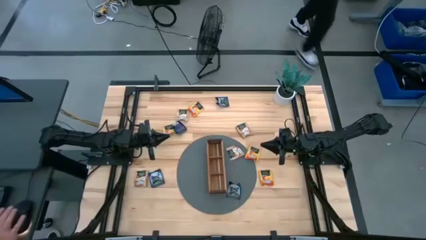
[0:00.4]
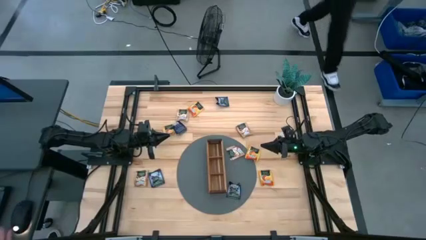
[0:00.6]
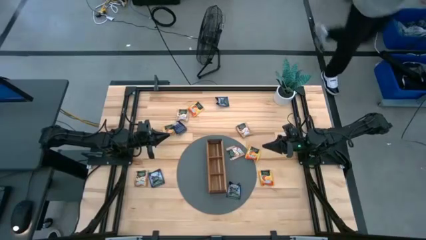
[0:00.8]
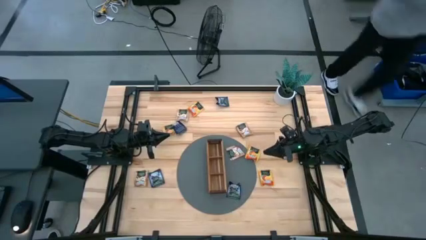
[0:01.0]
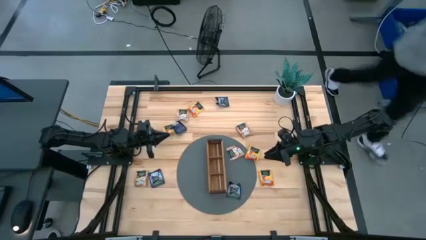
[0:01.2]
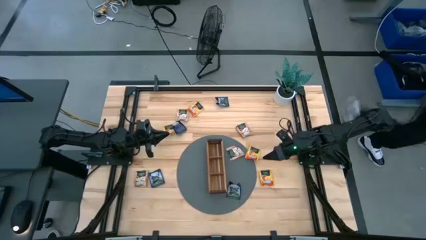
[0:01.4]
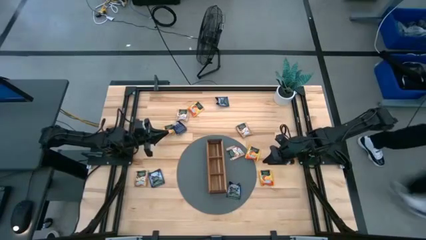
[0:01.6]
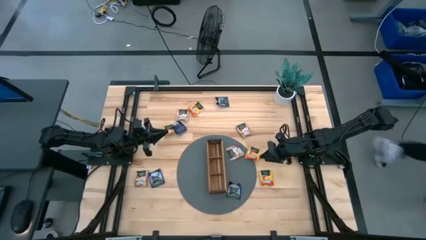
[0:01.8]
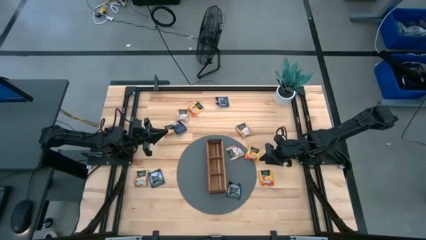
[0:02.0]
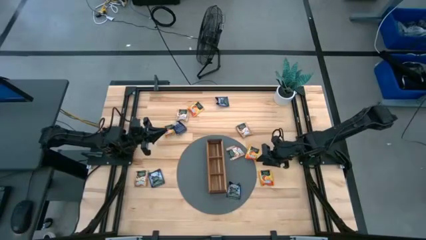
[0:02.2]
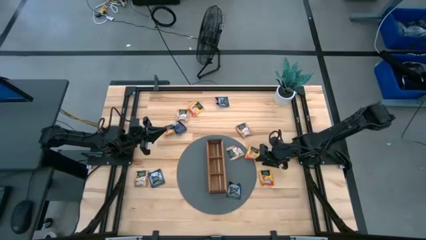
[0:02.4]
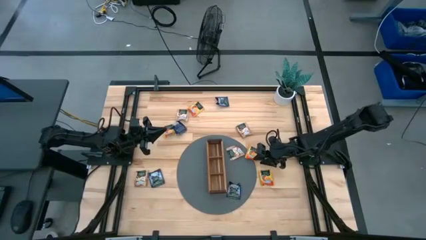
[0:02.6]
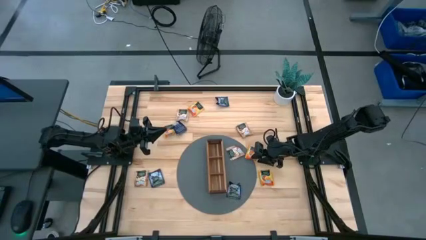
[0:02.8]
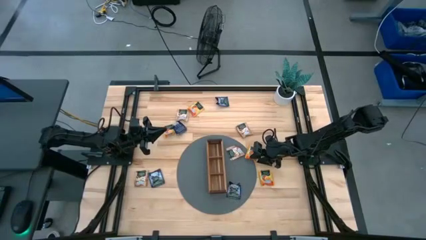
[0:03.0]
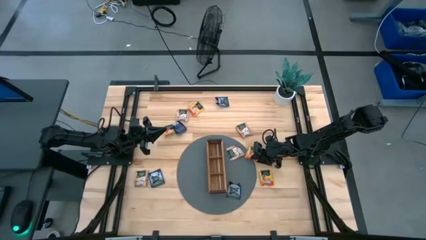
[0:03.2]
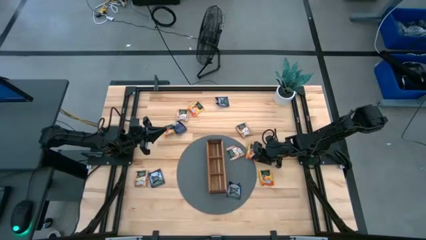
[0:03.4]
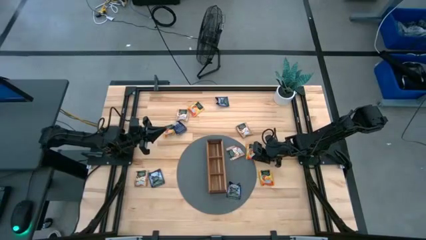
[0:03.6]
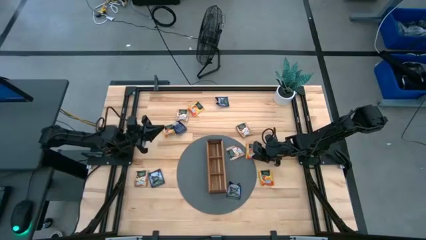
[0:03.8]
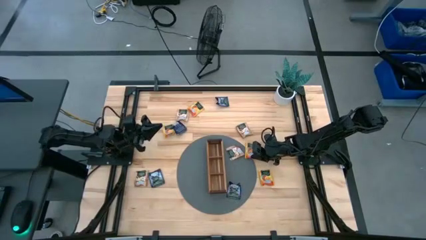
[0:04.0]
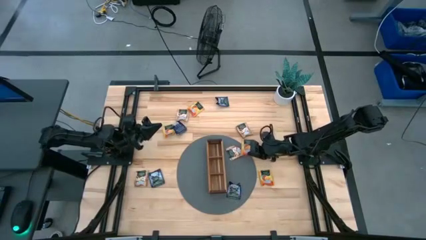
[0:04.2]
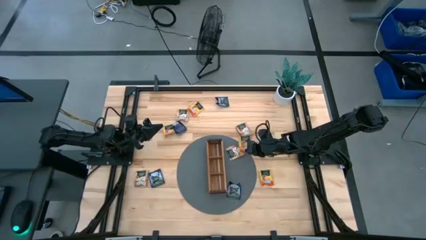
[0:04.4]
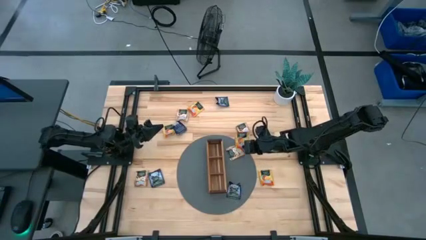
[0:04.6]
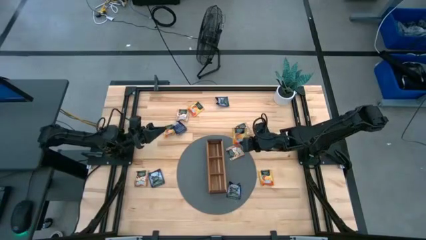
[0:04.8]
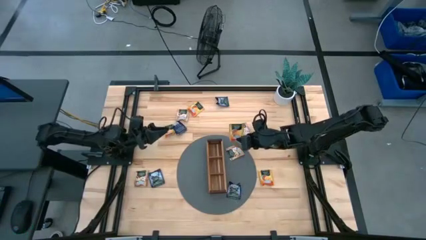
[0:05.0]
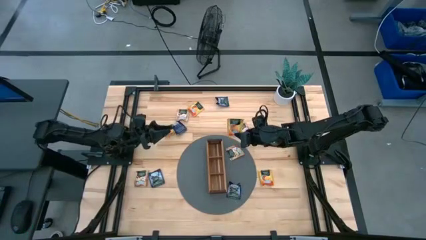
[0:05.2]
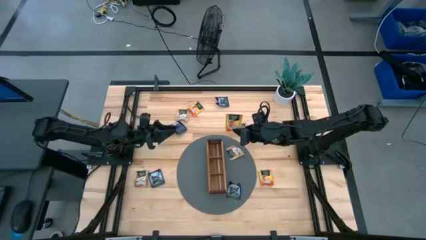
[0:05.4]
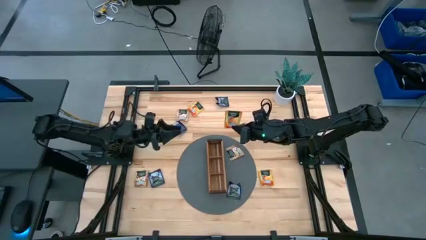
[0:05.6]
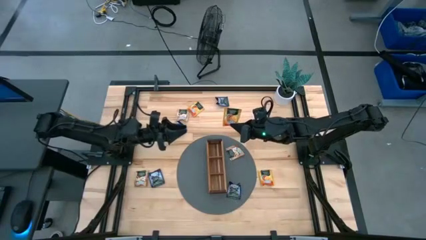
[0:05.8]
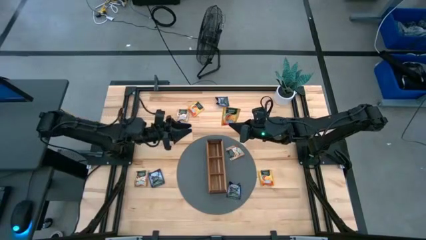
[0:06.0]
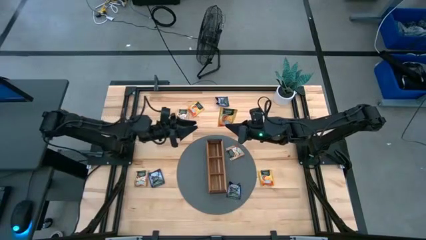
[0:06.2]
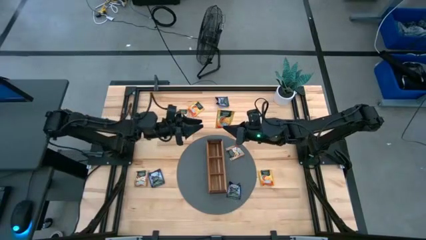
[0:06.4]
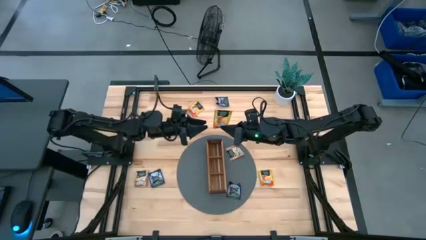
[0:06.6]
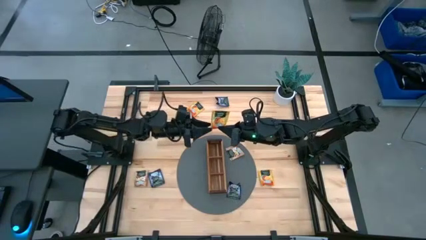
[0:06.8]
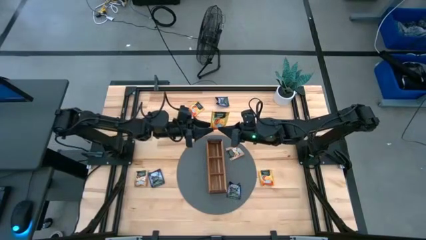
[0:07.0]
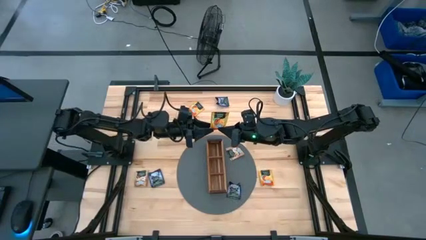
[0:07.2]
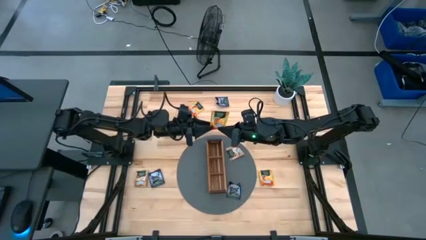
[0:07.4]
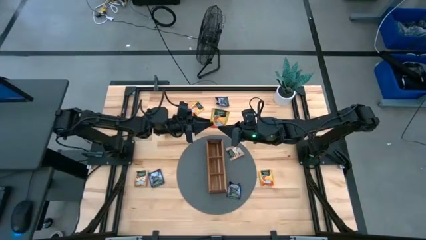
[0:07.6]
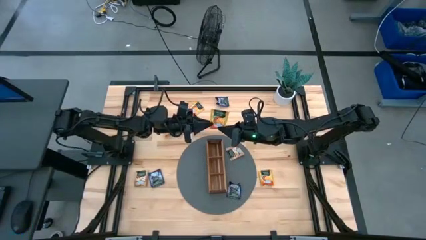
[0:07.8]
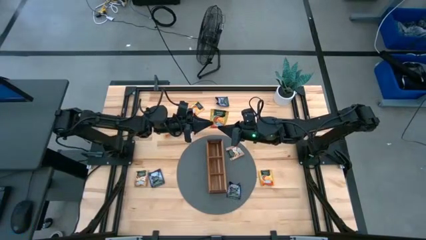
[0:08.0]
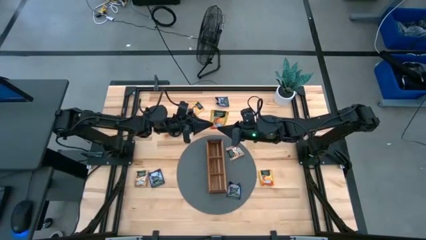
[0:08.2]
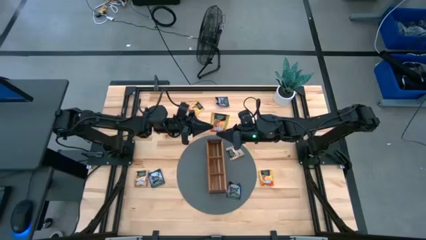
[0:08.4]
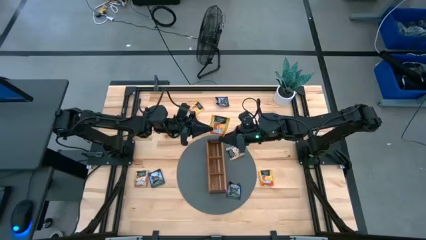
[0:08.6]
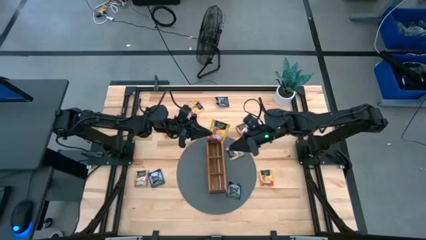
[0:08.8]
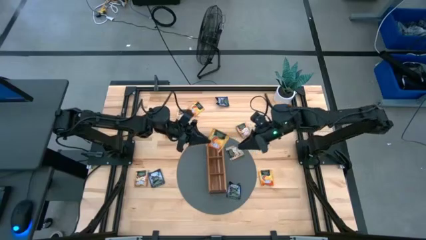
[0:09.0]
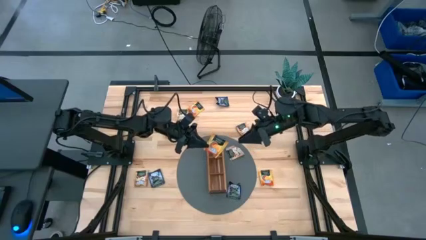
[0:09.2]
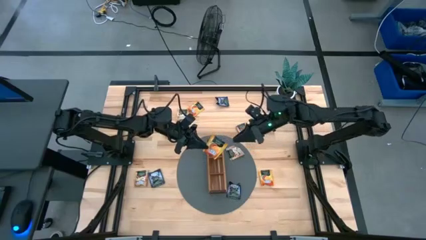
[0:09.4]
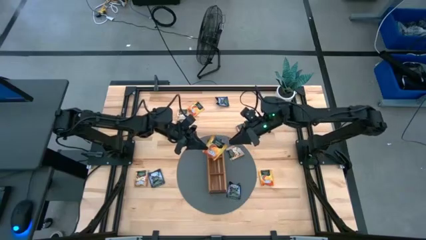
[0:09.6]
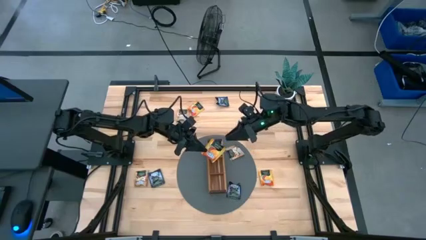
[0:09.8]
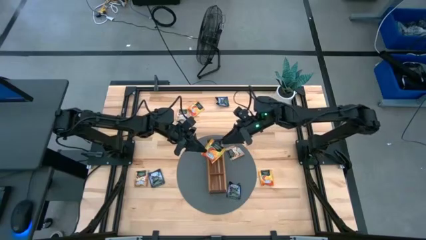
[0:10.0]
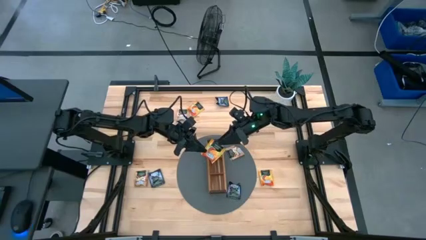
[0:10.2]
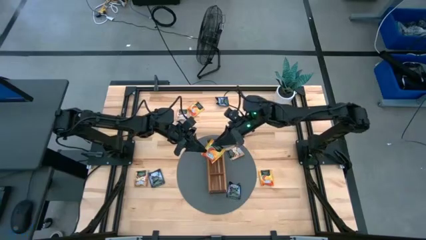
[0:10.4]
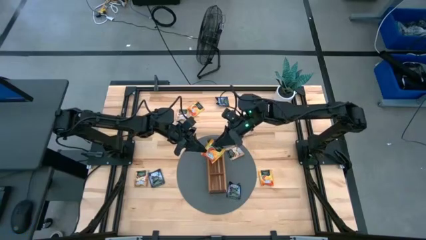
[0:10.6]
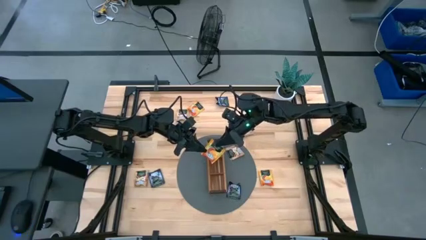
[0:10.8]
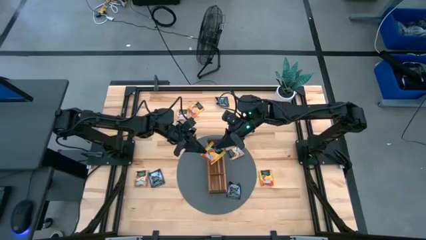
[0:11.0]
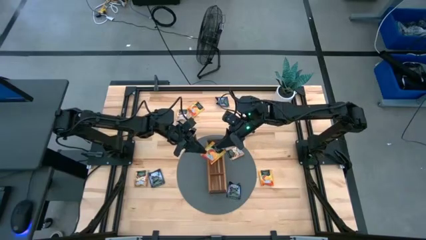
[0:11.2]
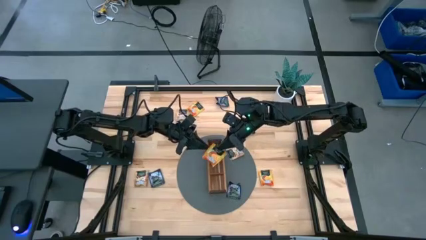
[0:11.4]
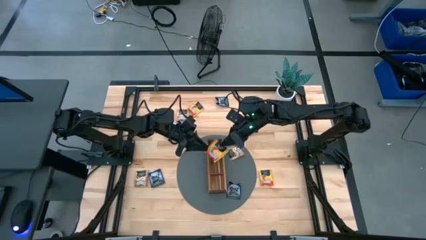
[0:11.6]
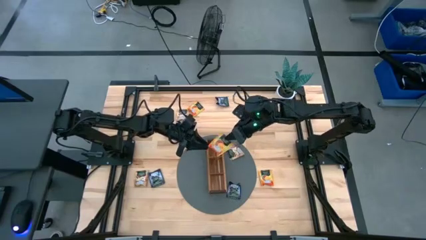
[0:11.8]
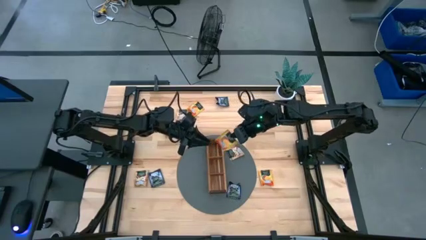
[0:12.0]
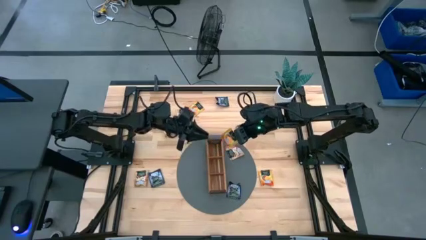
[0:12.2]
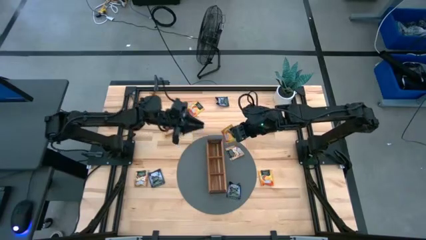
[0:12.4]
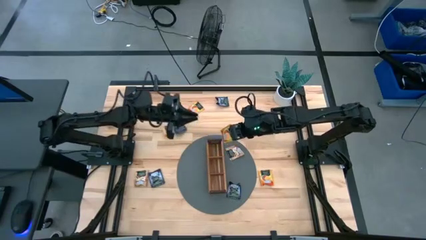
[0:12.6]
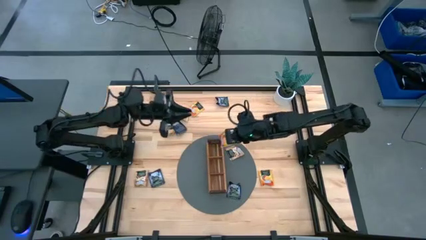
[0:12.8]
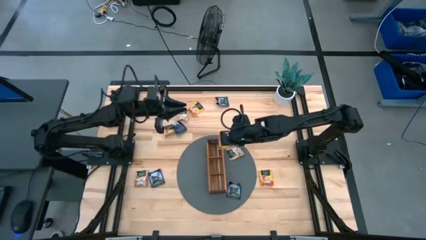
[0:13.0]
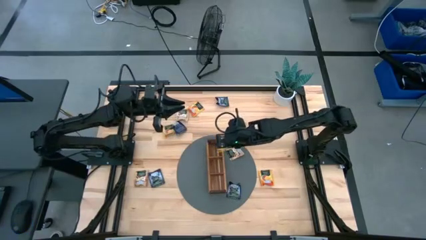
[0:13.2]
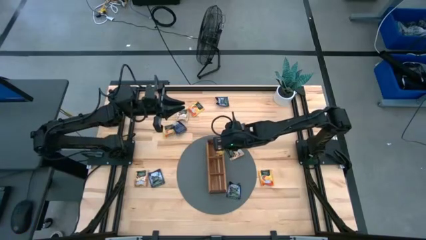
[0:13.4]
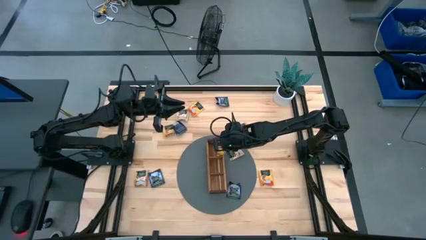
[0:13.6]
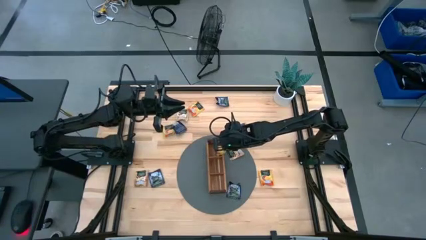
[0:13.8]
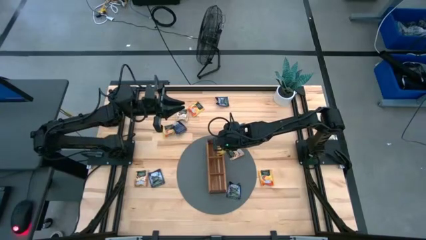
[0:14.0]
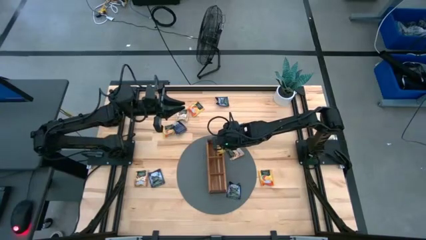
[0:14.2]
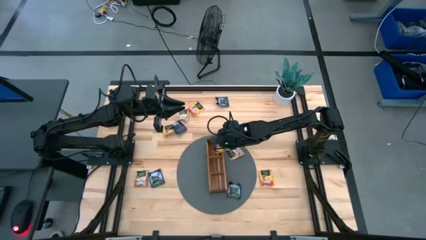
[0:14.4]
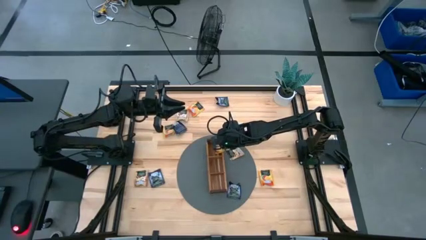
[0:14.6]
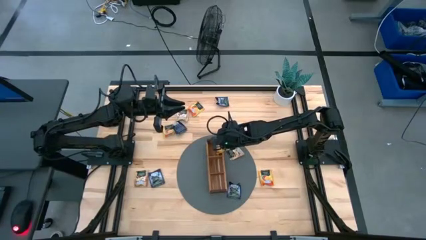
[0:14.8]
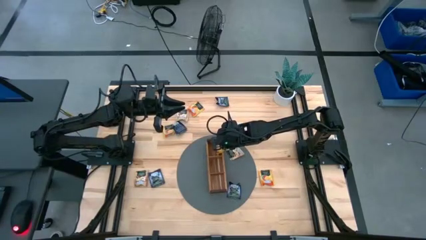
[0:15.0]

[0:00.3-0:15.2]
Task: Pick & Place Tea
Put the orange tea bag into the top section of the wooden organizer
